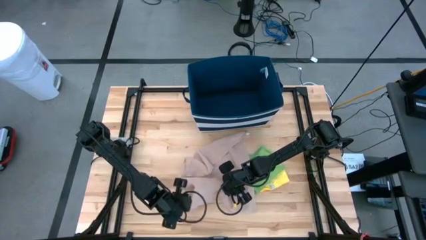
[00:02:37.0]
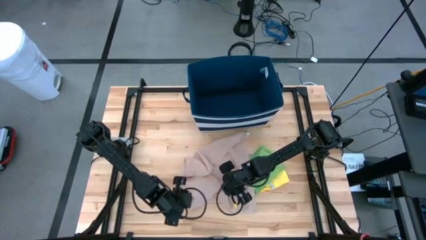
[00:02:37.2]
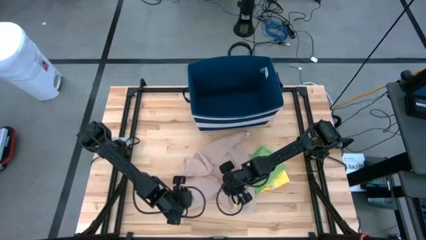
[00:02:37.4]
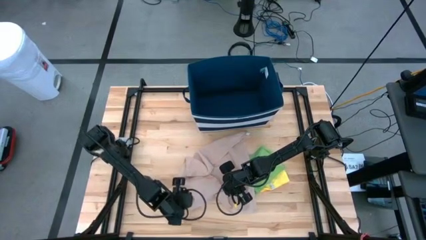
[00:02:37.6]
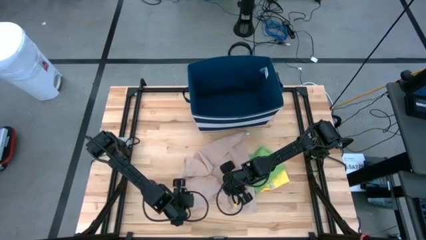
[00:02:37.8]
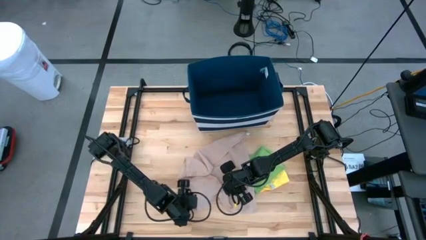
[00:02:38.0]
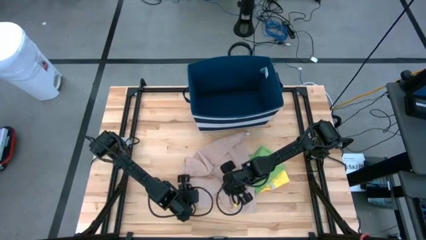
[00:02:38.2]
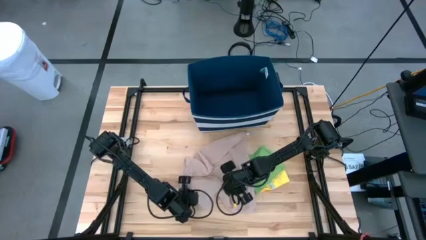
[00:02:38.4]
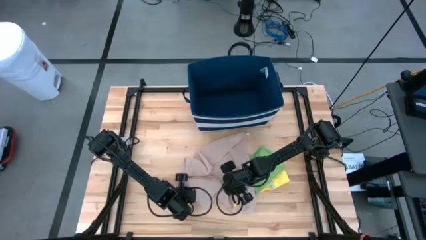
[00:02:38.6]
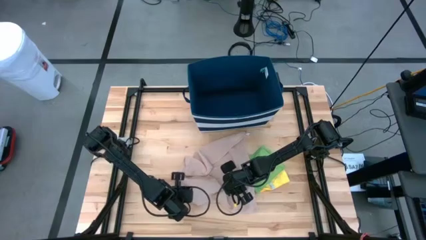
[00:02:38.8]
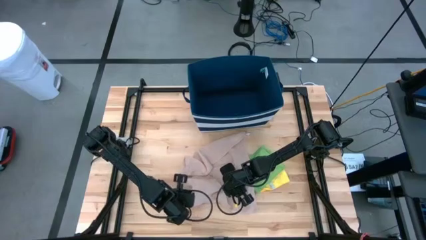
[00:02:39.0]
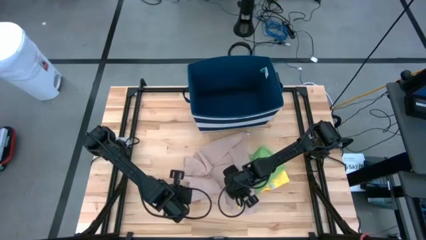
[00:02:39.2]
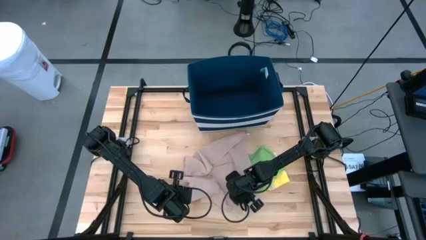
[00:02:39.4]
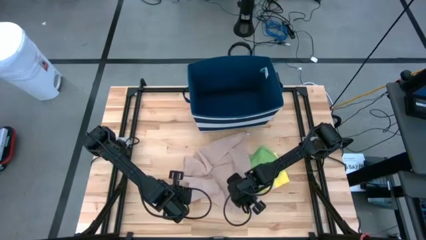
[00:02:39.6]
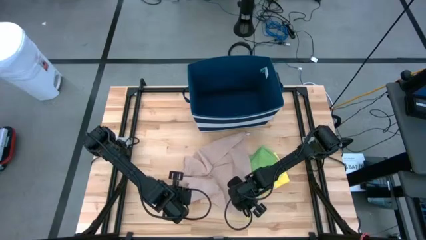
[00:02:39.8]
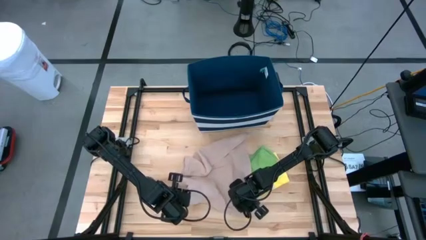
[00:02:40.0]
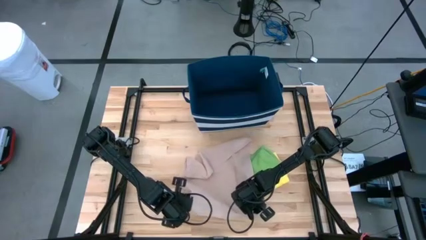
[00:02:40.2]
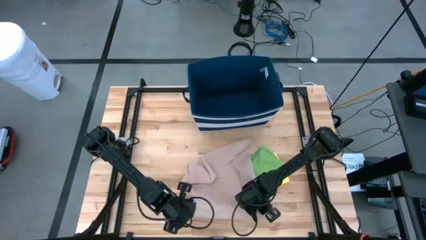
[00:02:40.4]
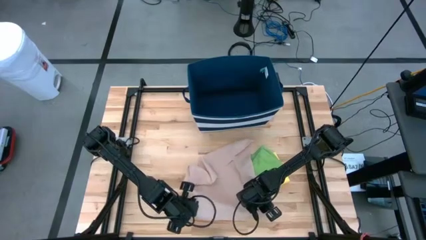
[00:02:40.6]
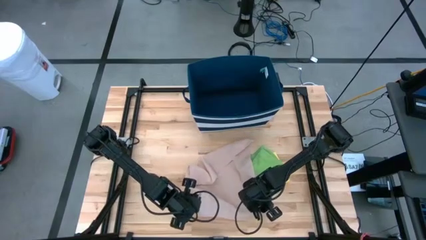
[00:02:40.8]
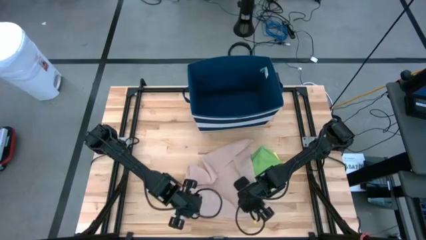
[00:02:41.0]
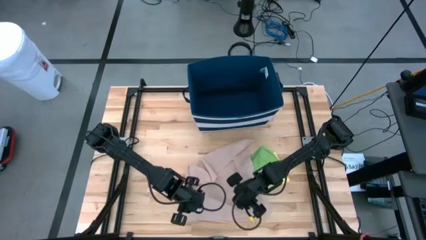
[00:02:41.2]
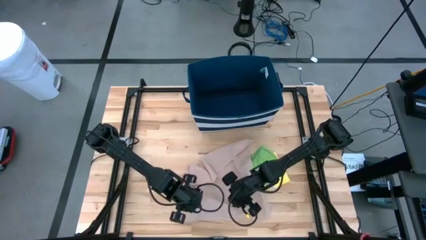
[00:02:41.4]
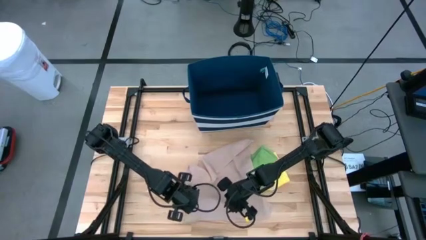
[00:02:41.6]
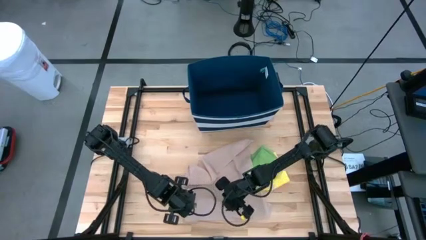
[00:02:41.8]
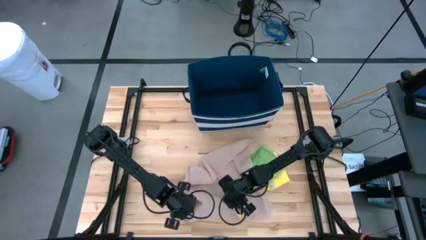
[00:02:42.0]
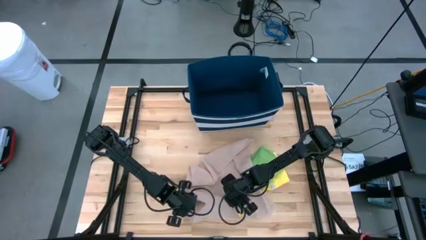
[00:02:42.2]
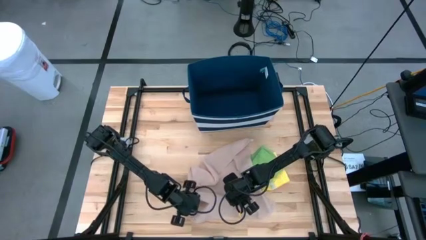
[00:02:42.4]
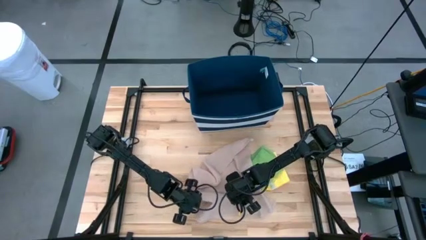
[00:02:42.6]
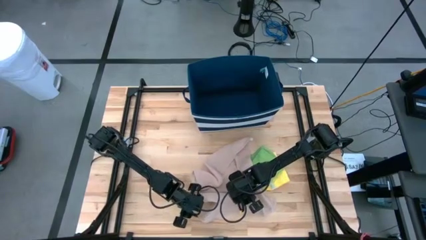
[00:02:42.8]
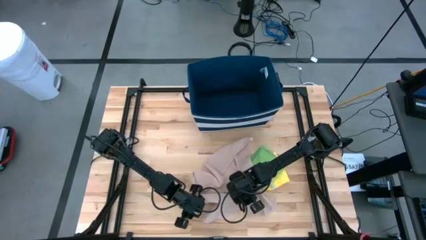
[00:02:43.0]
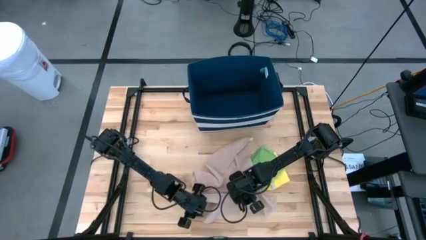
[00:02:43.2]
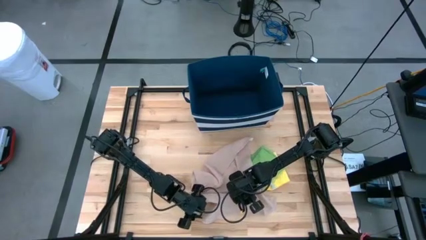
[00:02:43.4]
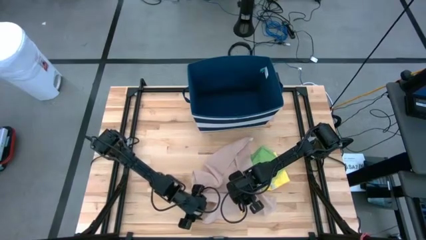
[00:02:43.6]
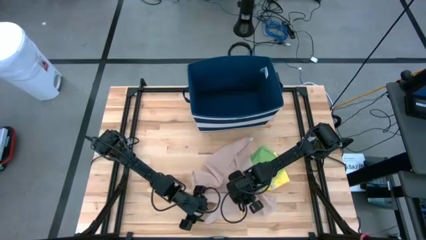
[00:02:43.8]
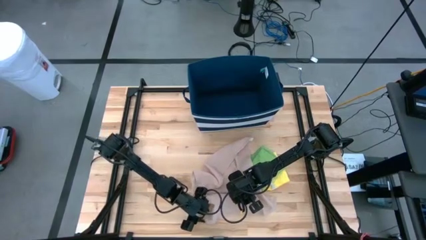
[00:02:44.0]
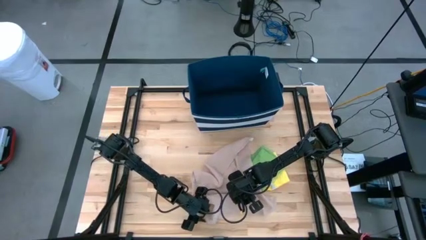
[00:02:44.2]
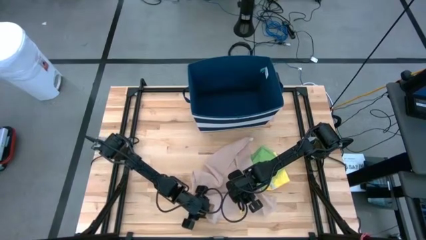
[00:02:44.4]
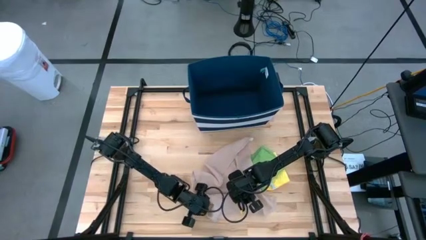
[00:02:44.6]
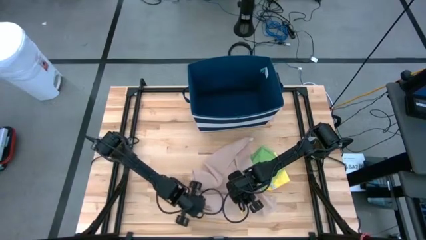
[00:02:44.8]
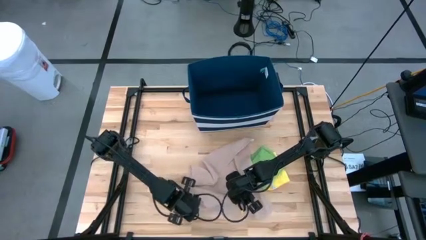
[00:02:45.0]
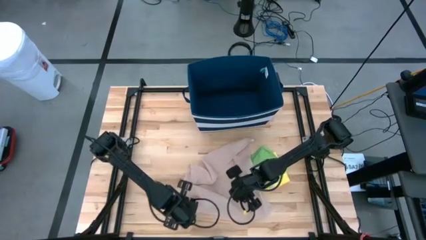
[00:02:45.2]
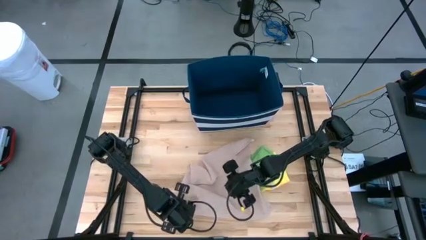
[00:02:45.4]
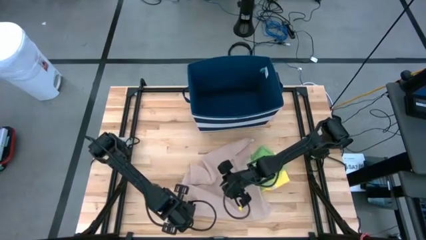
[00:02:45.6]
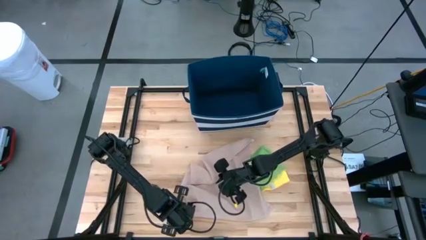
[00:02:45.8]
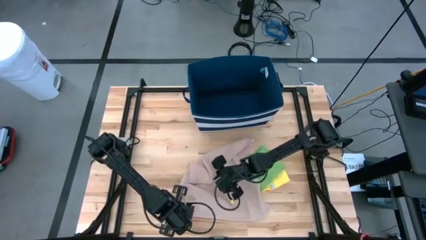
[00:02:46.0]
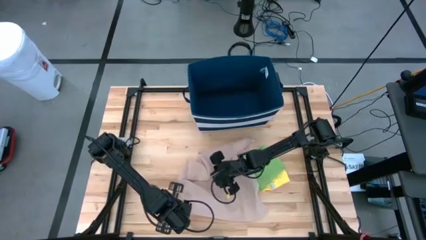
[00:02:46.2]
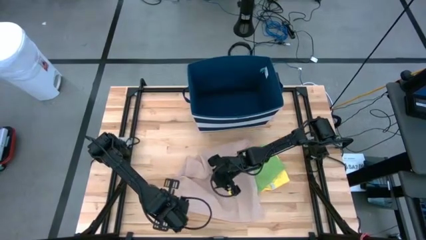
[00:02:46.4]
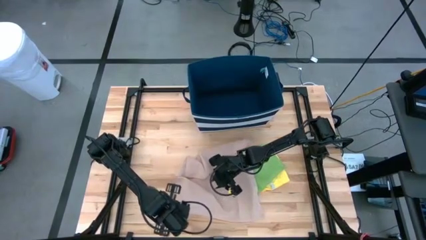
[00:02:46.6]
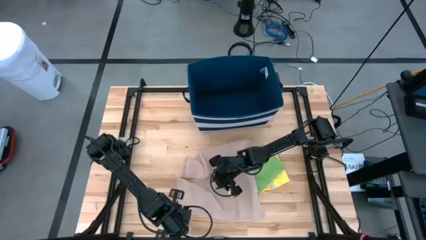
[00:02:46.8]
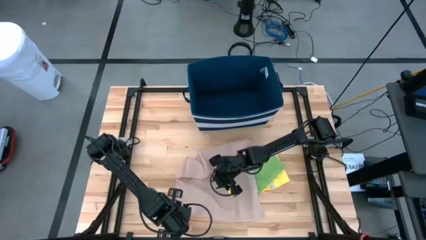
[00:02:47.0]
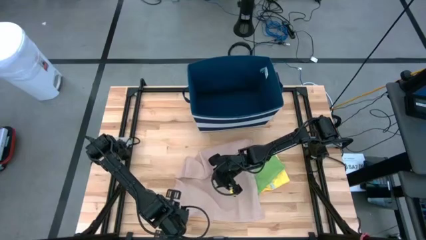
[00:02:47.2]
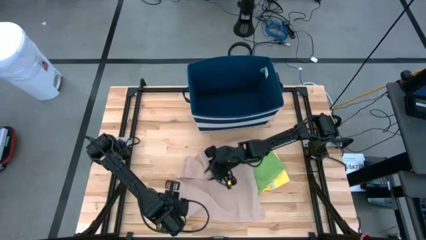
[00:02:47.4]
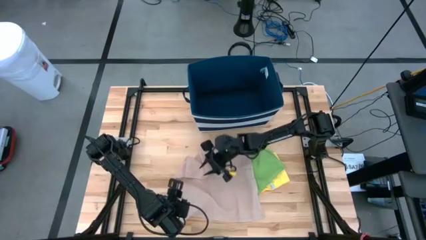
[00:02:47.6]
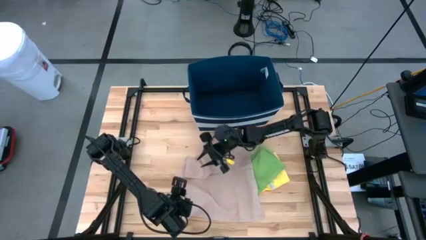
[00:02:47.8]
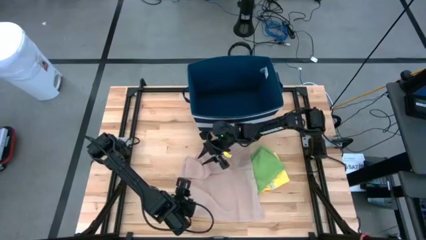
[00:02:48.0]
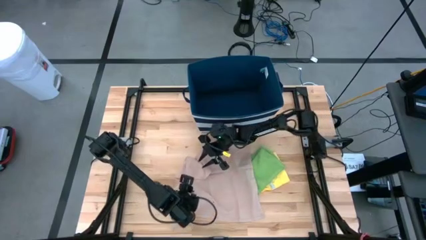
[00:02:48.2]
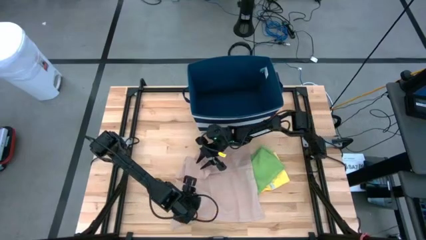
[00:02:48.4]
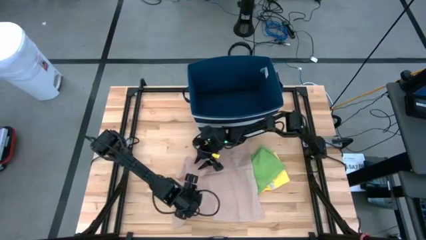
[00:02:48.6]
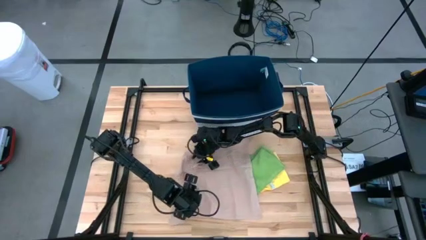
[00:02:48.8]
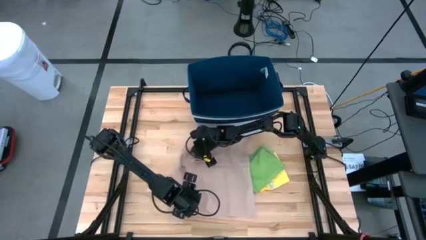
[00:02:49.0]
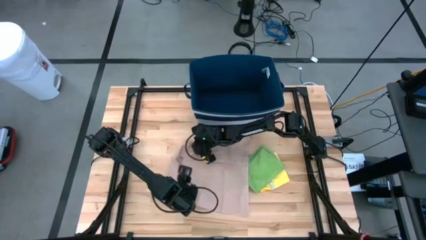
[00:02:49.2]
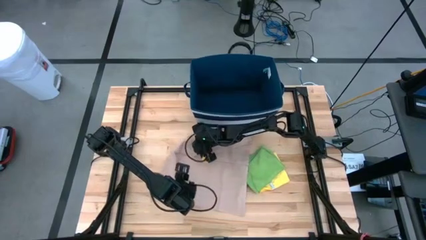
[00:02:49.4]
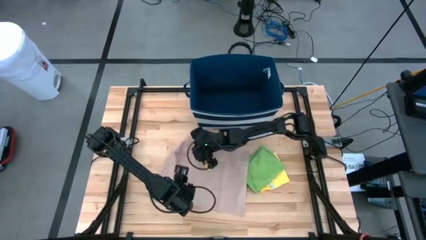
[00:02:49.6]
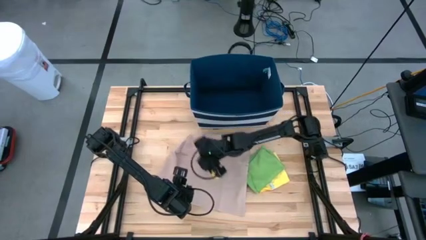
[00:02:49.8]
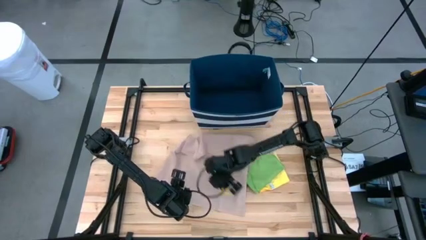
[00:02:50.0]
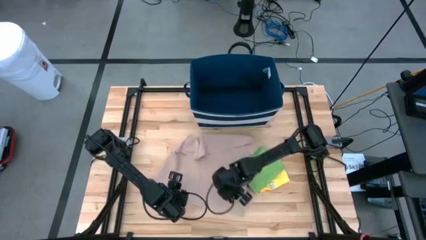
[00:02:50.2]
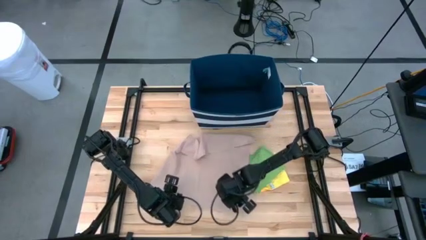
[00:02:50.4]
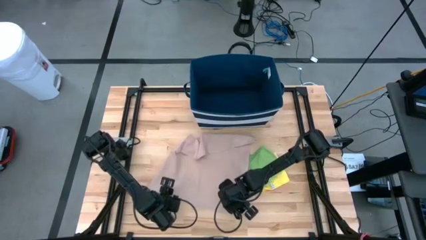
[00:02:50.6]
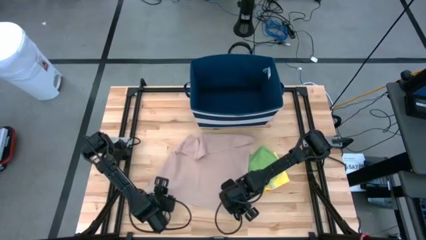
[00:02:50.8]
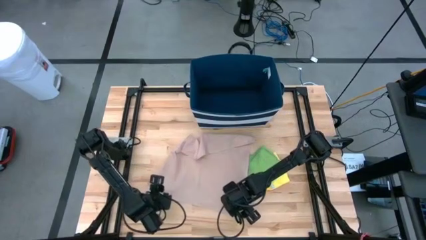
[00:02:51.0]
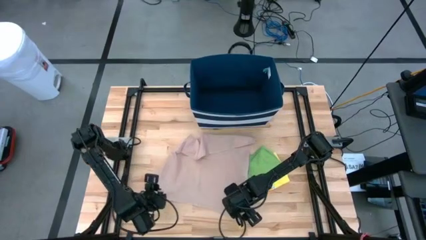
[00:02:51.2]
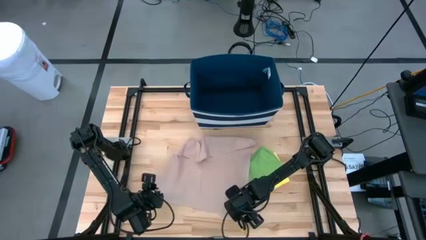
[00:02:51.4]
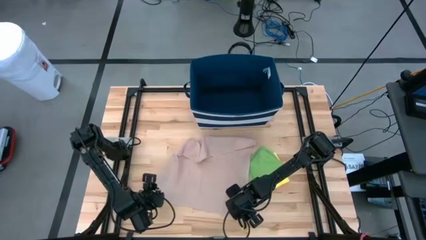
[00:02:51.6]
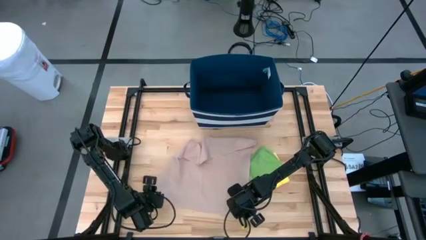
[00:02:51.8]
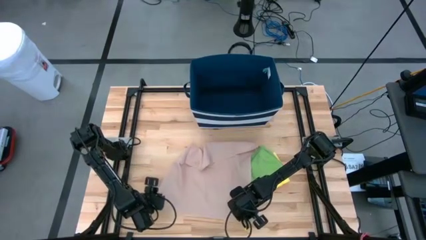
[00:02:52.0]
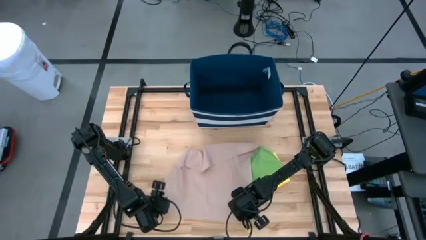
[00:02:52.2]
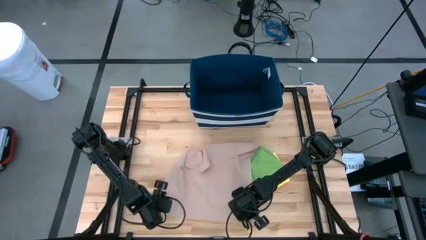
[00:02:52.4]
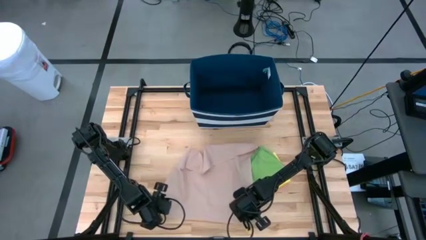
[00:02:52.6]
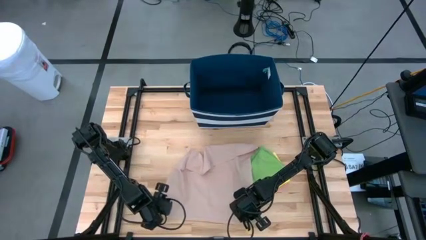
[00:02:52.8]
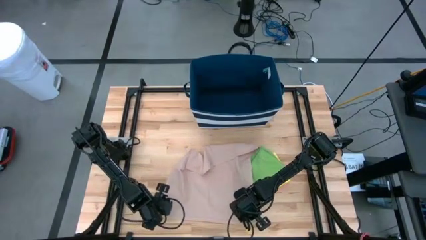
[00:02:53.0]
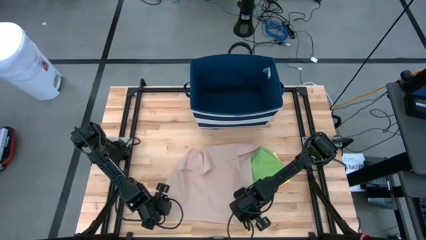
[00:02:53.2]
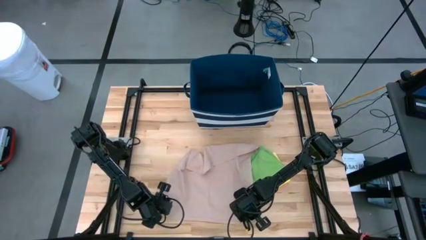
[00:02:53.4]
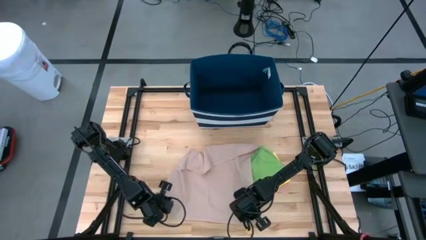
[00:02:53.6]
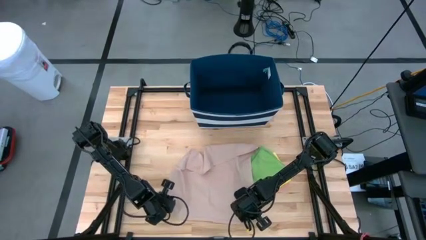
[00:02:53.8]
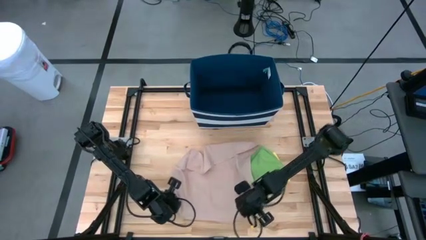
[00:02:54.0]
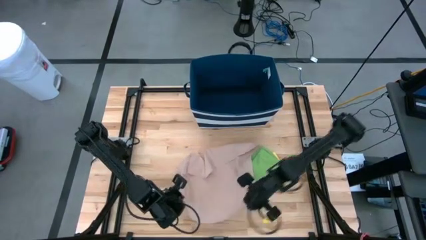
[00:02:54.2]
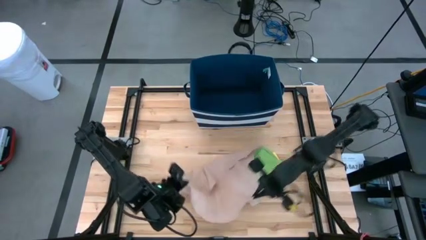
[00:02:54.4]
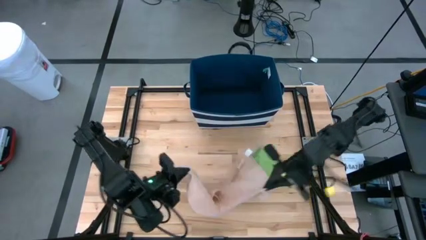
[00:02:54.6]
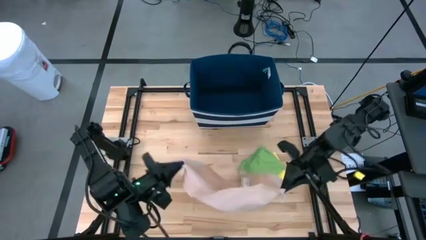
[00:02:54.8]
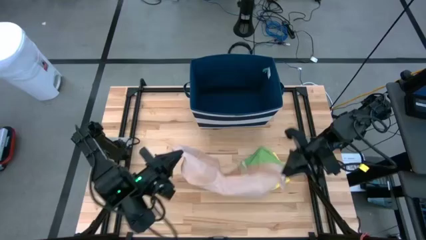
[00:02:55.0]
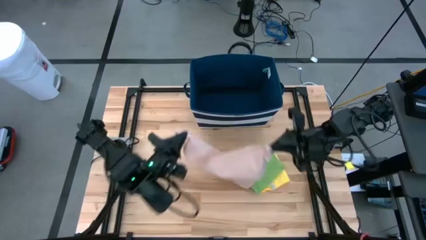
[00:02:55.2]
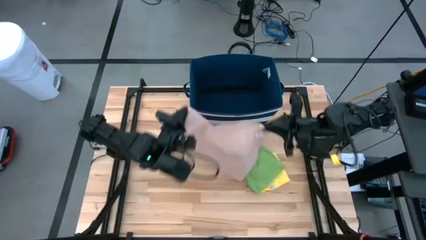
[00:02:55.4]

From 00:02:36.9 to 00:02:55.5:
Task: Fold towel
Fold the light brown towel
